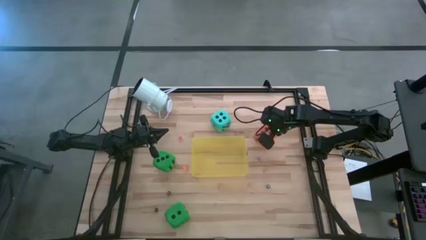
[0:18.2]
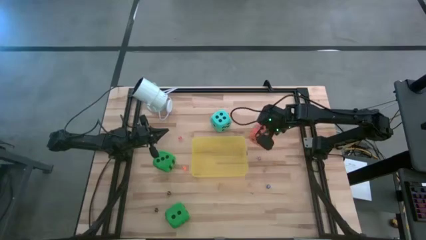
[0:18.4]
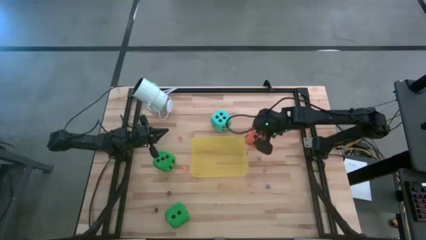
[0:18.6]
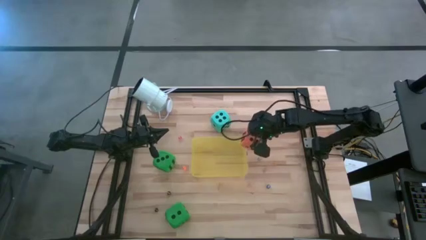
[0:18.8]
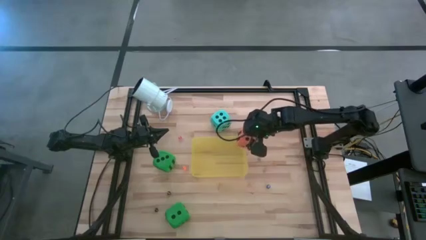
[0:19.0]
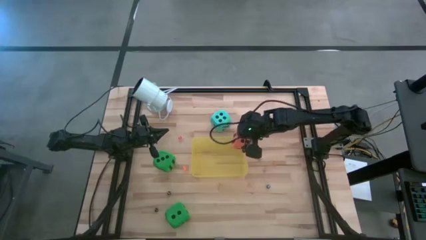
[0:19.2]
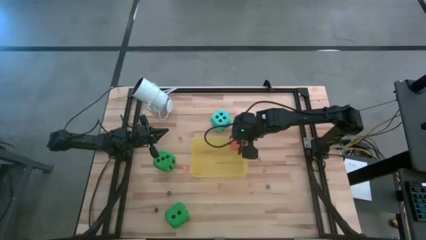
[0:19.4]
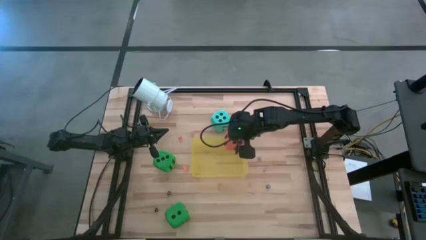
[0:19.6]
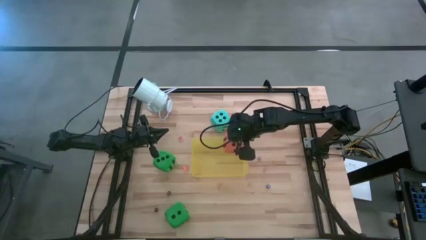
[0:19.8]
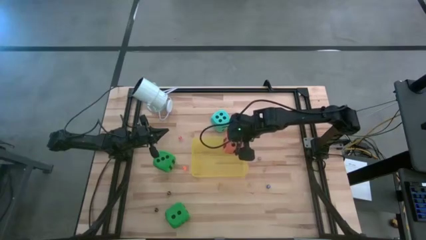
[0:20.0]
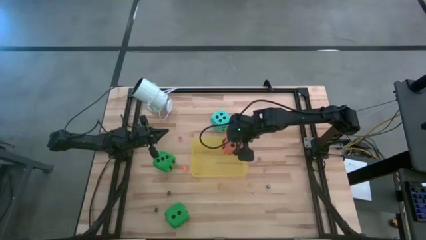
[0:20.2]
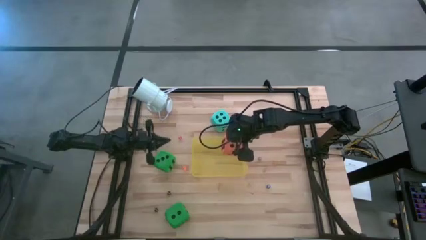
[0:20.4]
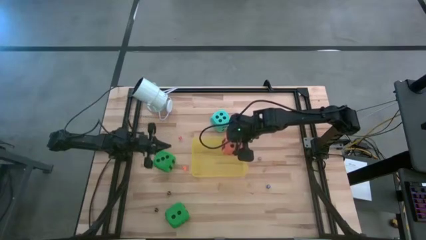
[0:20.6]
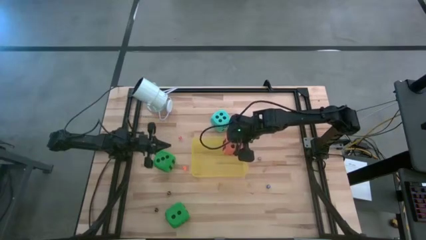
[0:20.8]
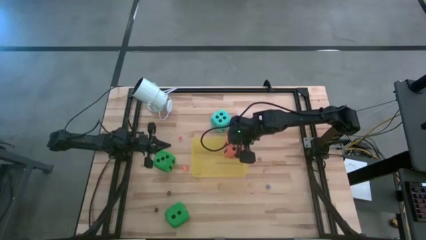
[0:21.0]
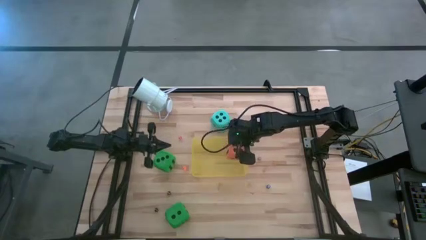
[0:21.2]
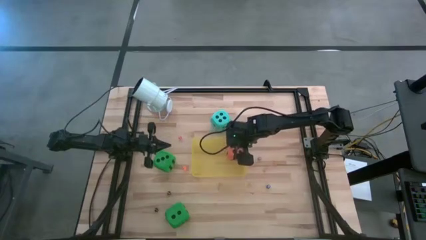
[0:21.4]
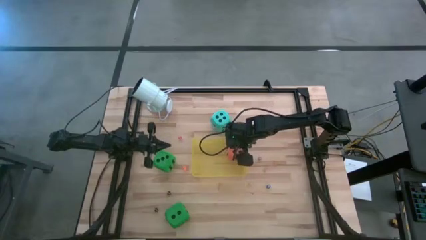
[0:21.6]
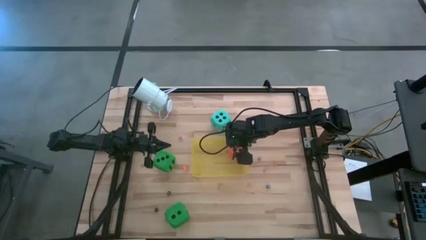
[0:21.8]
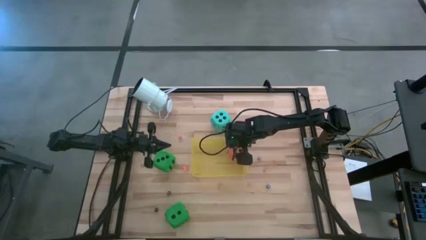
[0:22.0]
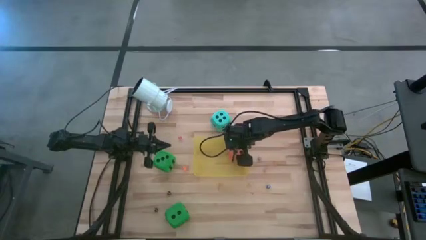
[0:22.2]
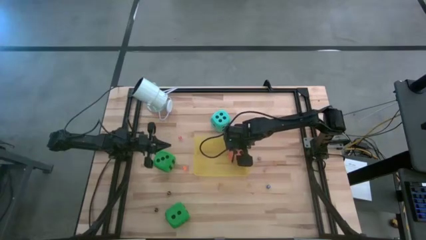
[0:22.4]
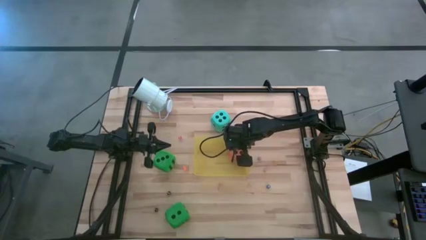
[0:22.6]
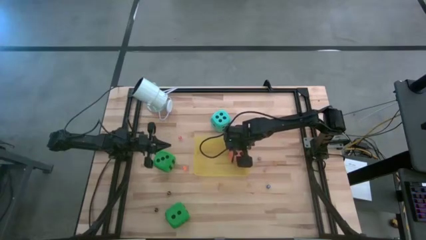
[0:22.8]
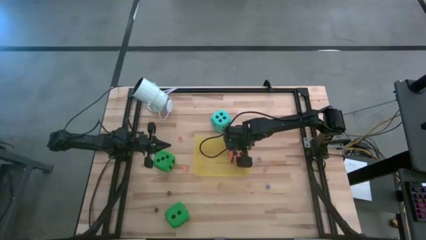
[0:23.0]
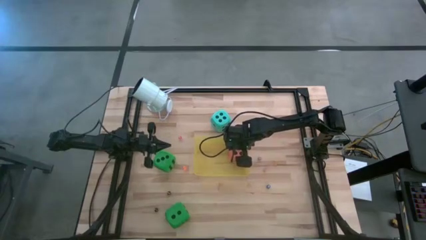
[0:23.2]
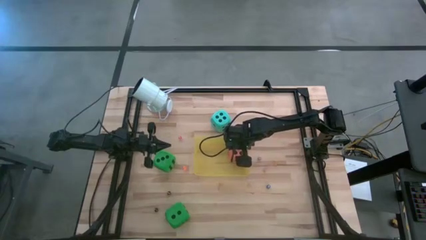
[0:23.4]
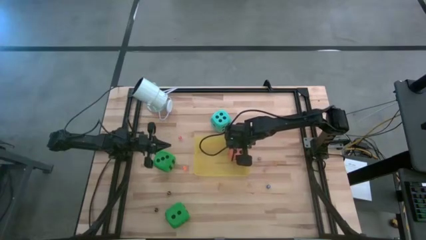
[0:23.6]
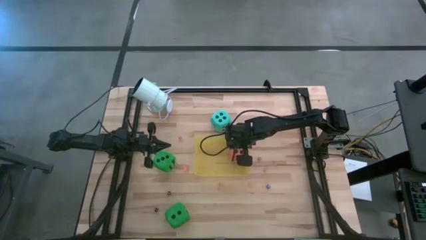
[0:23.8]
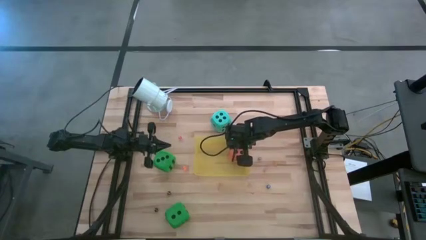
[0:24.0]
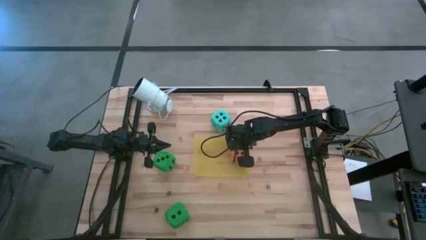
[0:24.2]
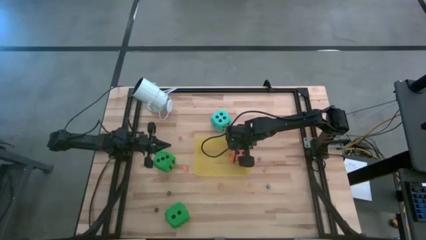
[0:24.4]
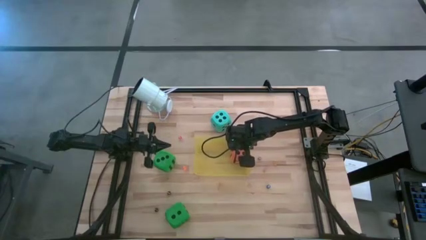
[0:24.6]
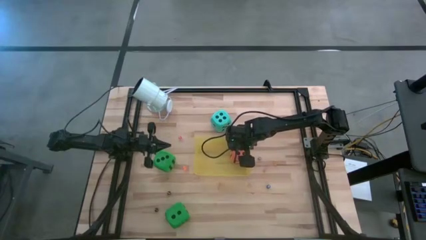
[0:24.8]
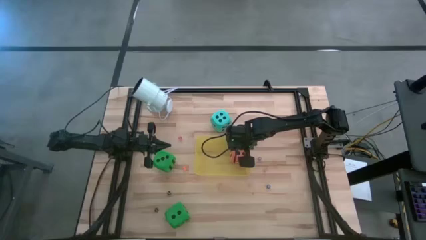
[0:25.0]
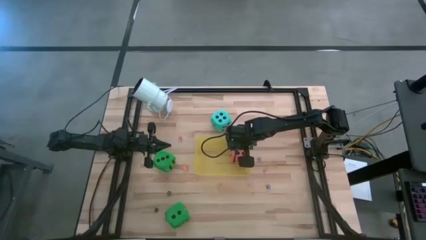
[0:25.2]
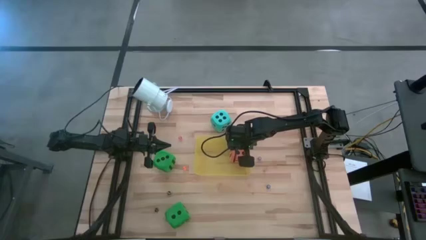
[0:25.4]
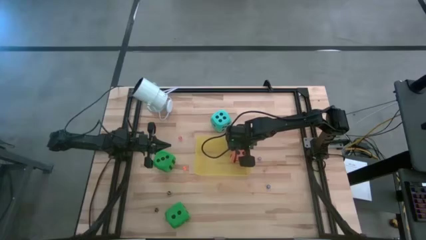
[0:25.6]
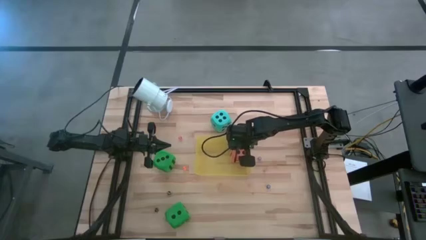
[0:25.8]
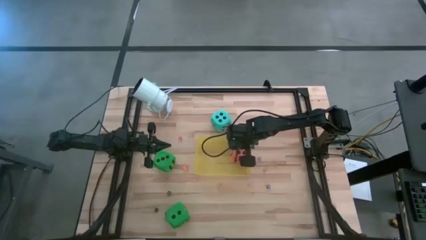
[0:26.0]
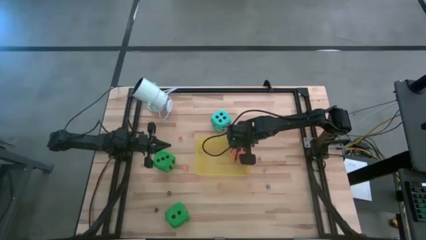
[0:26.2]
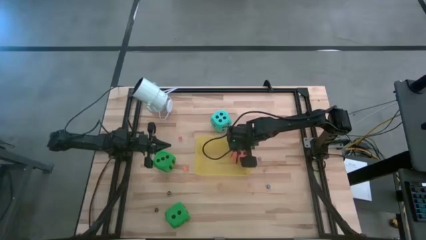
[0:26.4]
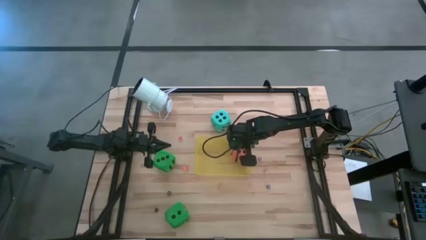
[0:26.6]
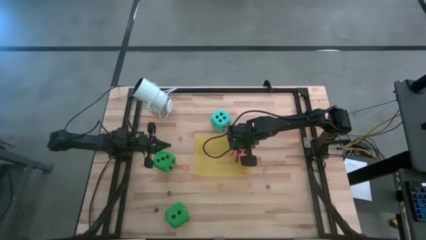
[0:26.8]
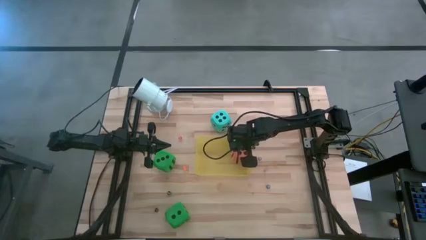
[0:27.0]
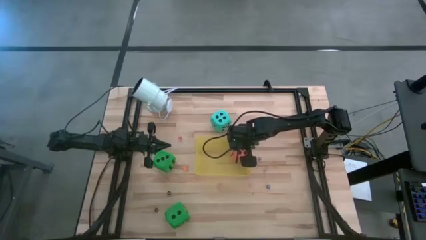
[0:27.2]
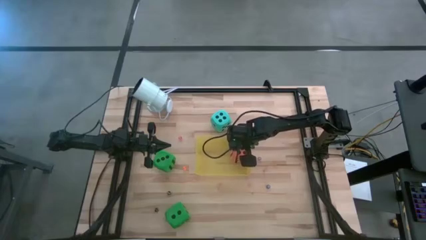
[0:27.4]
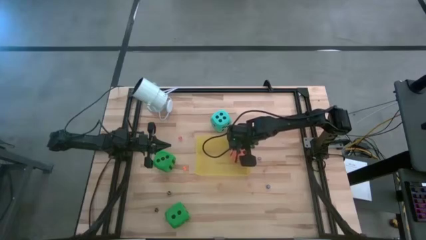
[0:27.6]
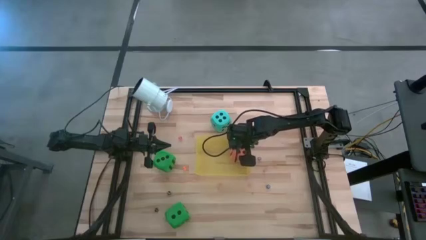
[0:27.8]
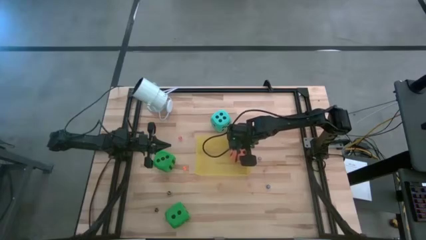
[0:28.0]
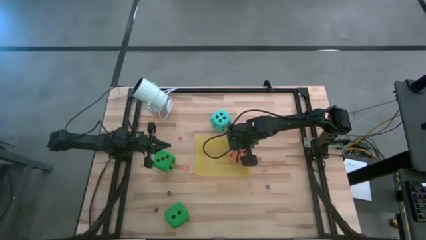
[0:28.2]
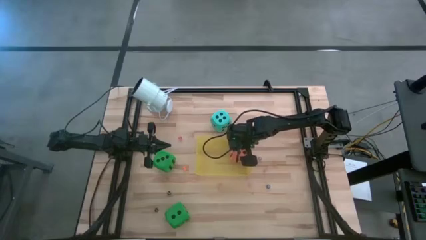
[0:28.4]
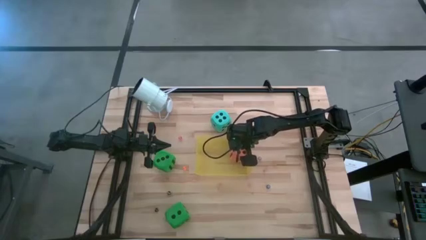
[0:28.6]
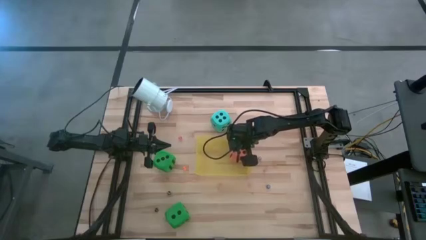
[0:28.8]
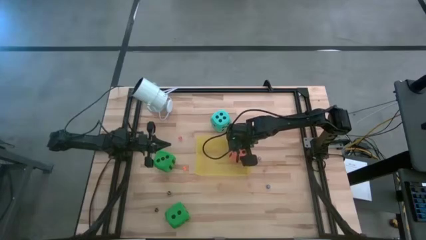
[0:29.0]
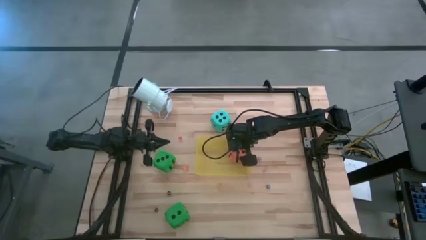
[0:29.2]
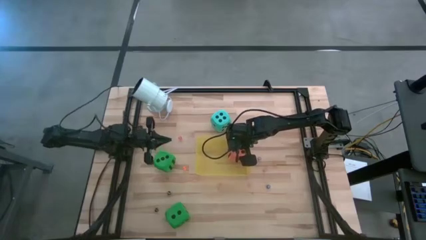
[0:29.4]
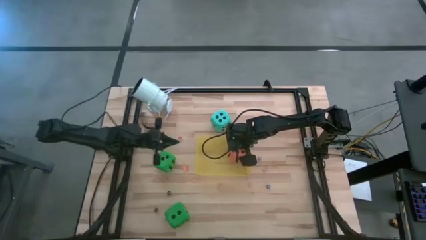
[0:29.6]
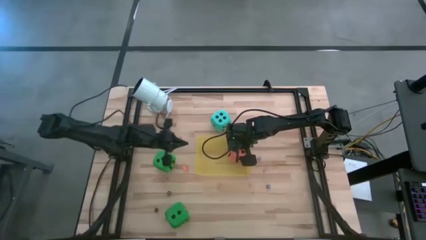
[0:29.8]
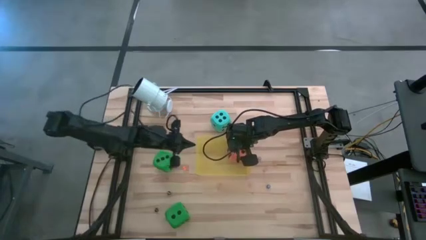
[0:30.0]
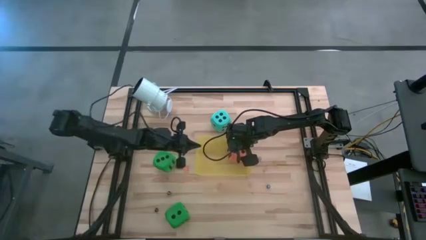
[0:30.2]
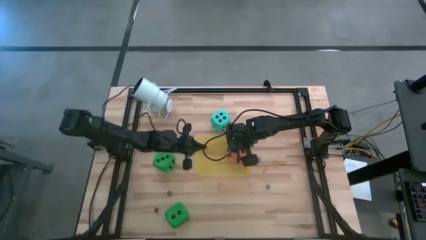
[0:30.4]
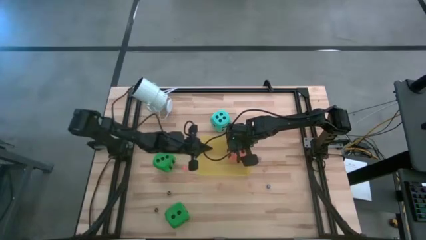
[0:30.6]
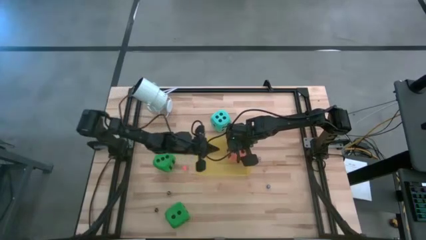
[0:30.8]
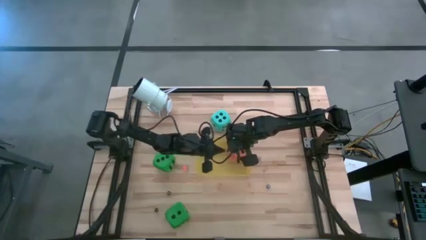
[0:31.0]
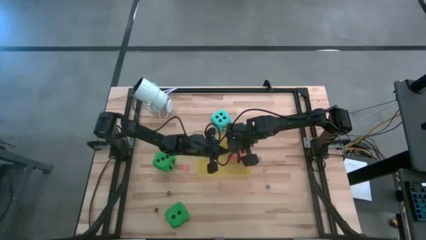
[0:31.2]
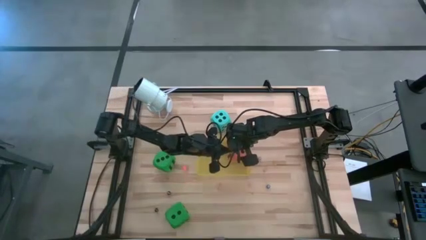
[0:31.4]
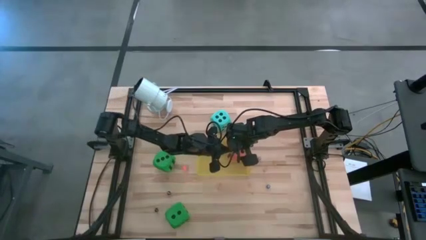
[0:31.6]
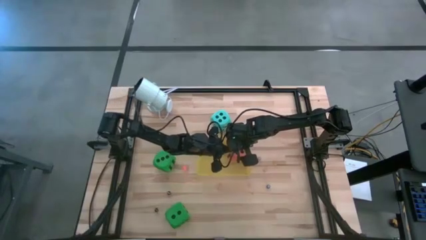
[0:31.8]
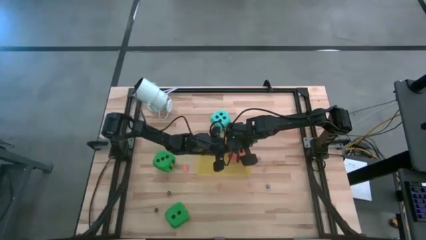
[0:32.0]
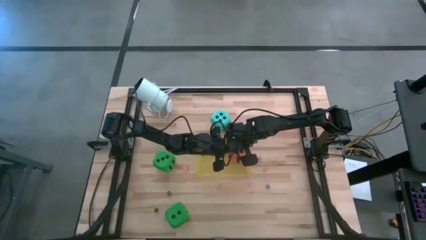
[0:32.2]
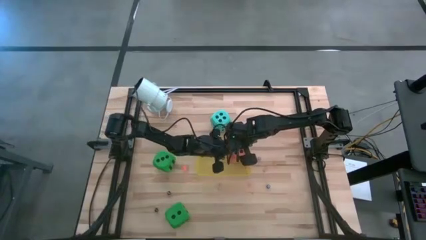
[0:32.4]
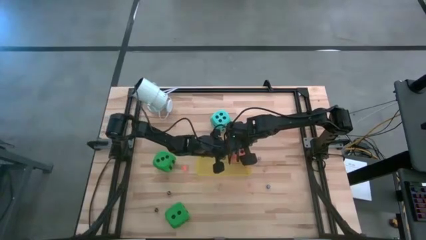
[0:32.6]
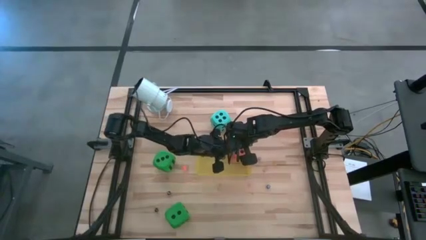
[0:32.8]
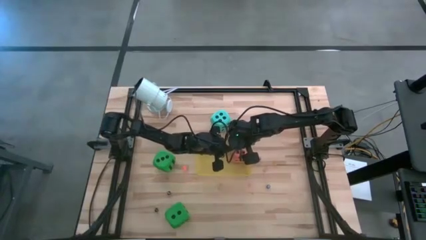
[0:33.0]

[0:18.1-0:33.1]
Task: Pick & Place Dice
Put the big orange dice into the yellow bin

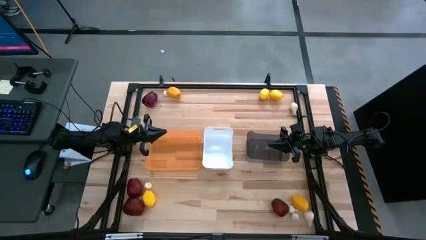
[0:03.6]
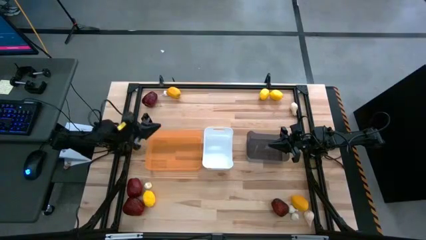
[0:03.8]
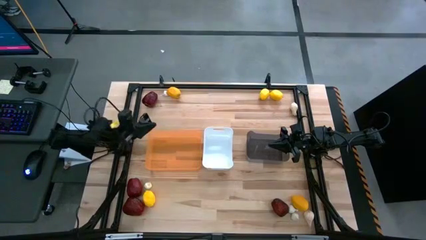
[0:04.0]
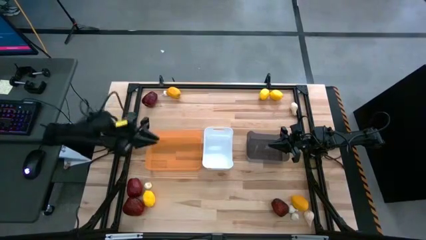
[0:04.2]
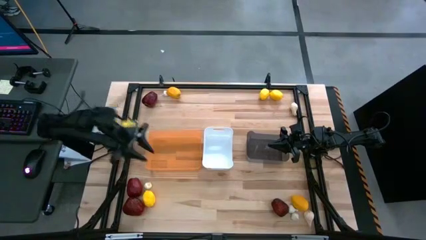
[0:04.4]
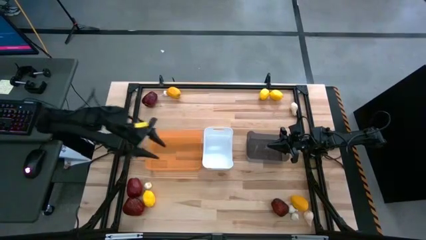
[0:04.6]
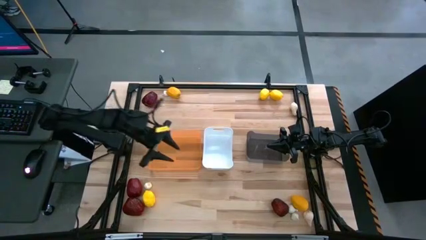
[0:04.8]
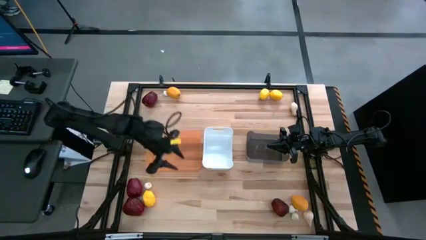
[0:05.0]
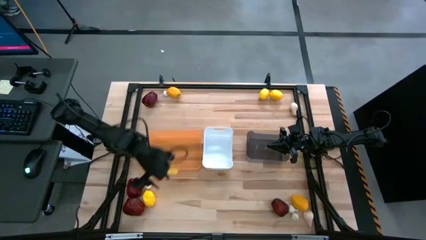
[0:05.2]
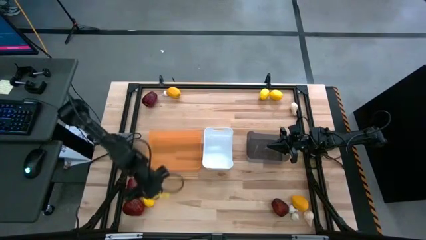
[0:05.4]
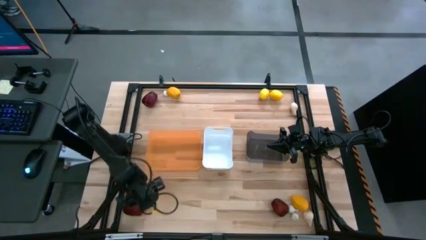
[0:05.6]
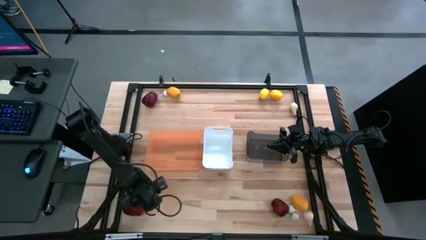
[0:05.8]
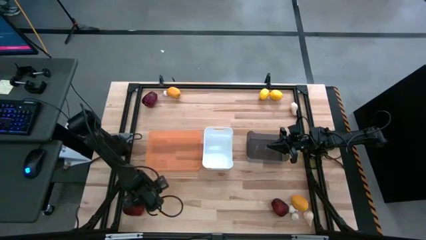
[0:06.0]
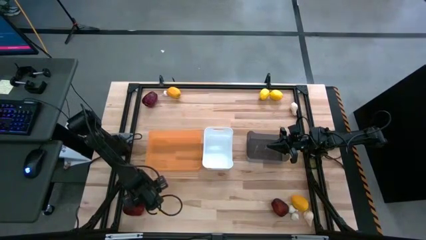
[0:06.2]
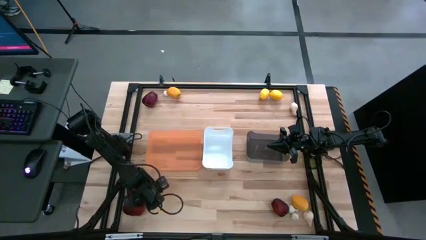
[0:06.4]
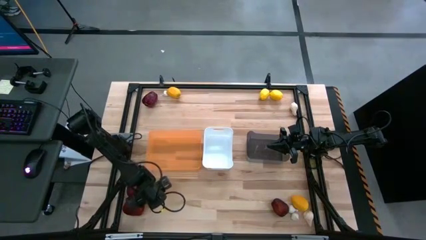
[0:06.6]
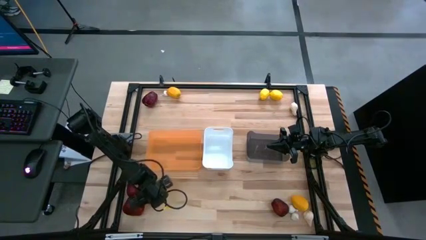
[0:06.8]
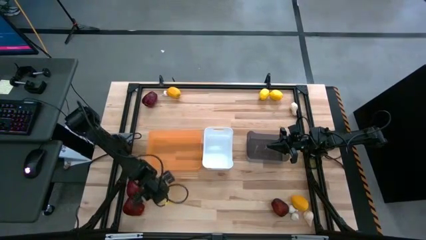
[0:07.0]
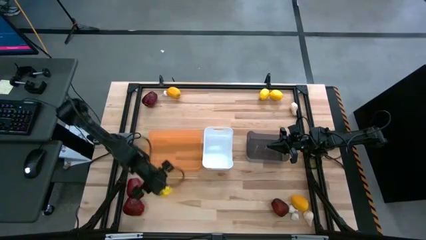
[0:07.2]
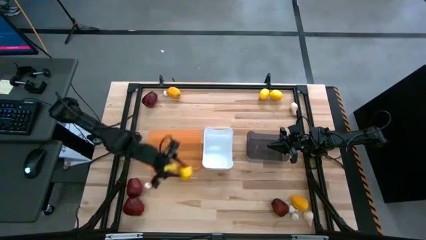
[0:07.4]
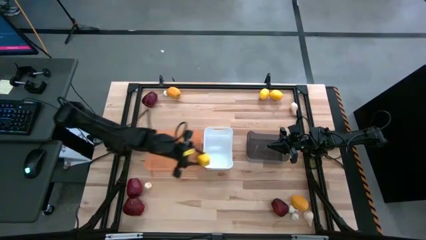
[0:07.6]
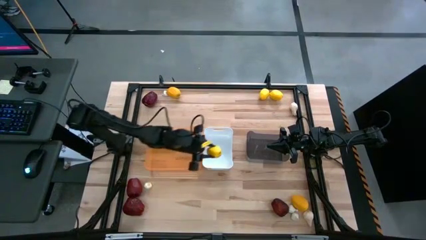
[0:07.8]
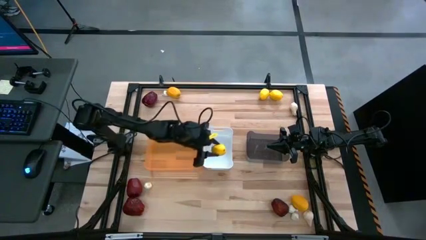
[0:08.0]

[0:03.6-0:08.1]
Task: Sort produce into baskets
Put the yellow lemon into the white bin
